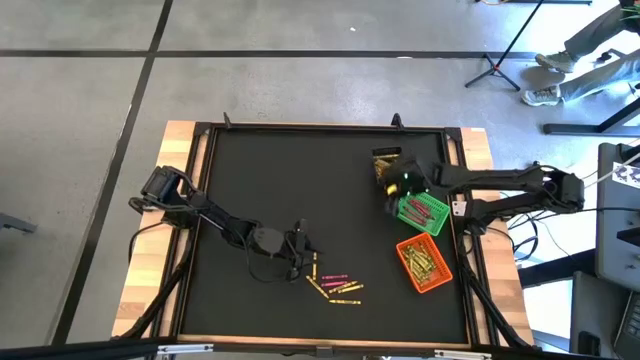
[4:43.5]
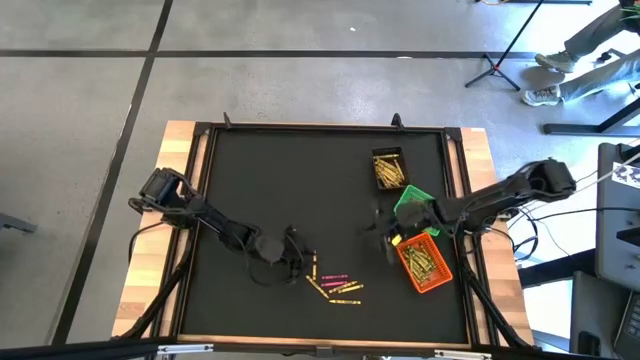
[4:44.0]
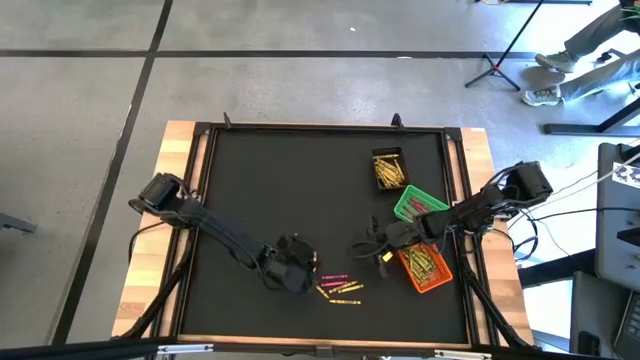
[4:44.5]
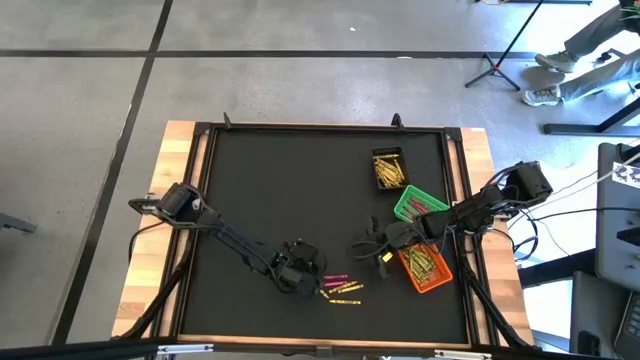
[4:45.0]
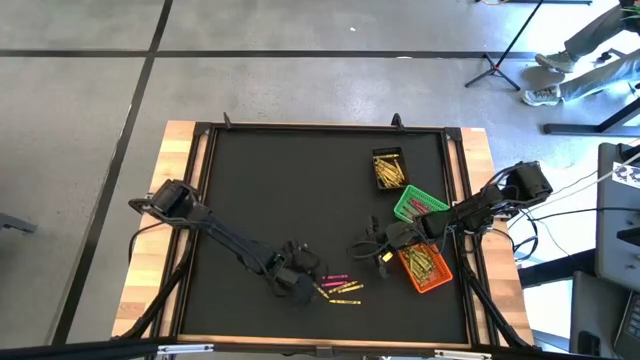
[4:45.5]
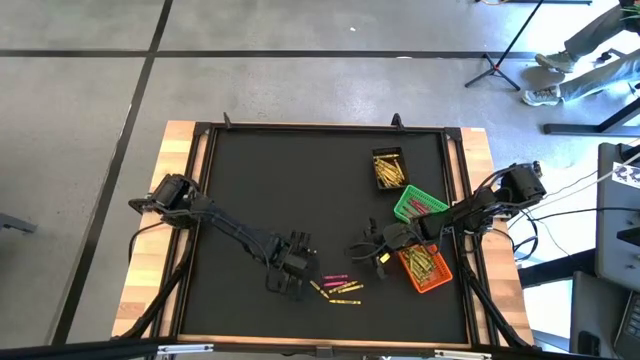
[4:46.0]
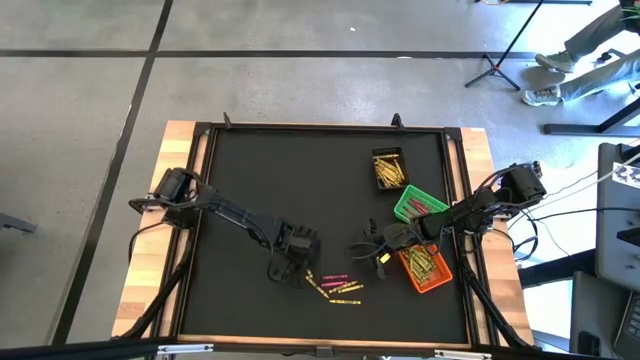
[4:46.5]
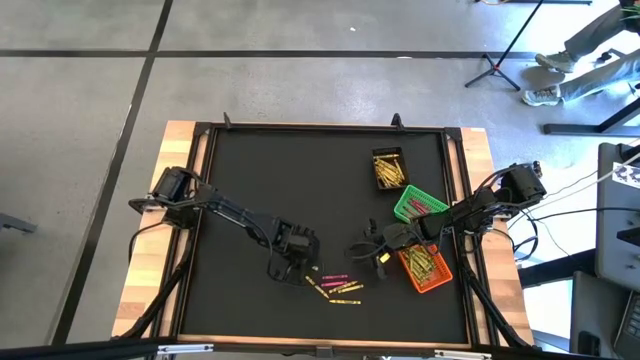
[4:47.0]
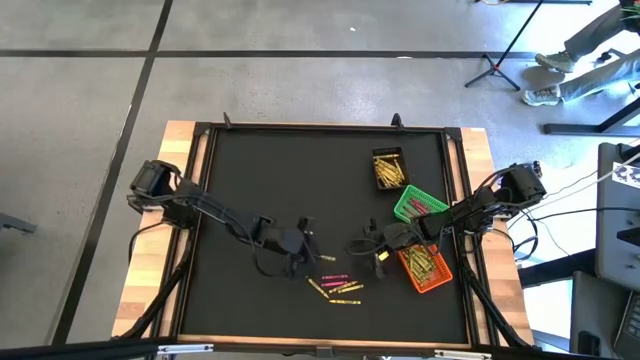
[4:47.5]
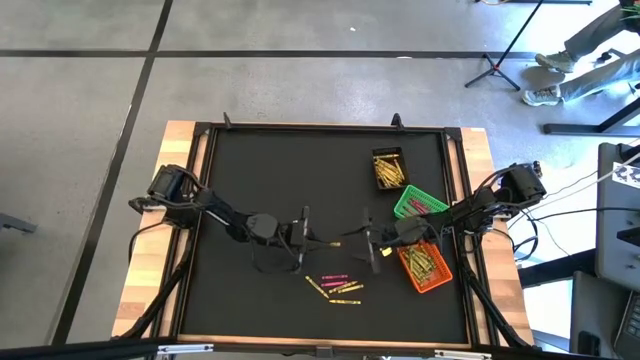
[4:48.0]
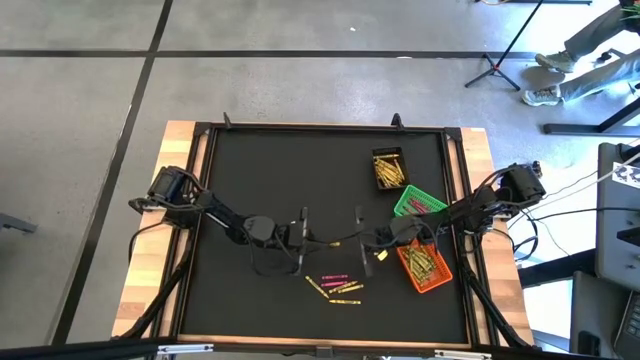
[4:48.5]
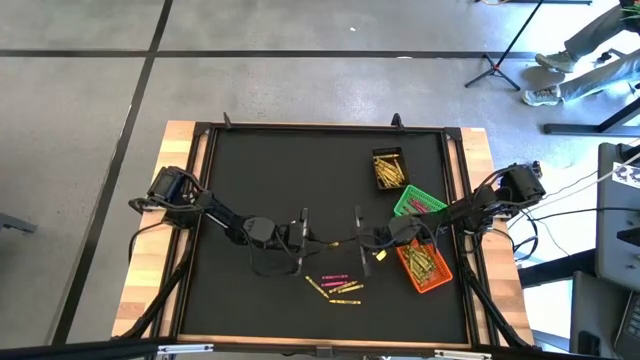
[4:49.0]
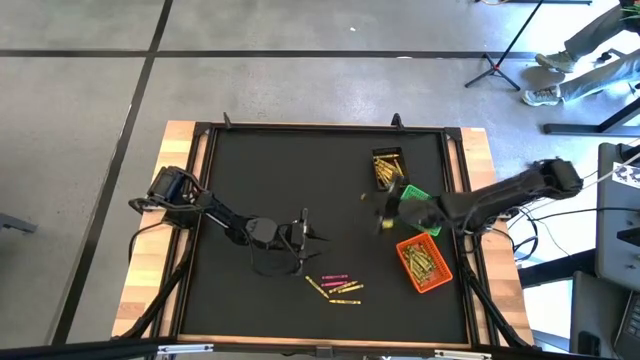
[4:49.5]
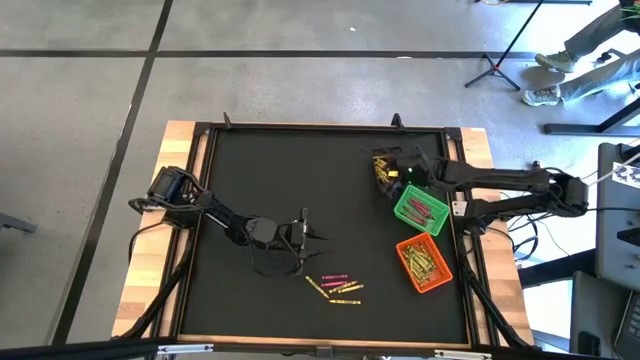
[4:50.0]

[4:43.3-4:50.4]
Task: Sort crayons
Put the yellow crayon into the black basket

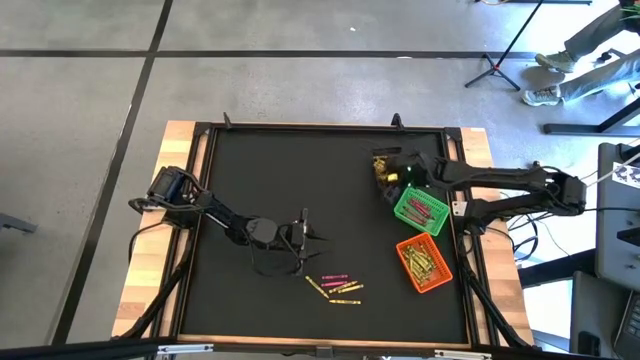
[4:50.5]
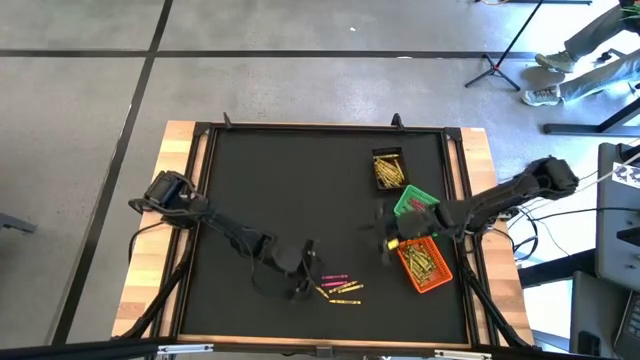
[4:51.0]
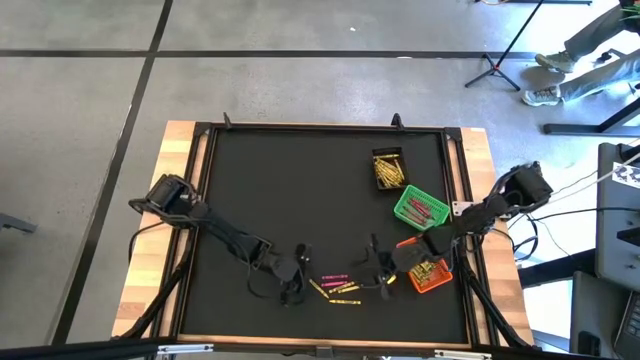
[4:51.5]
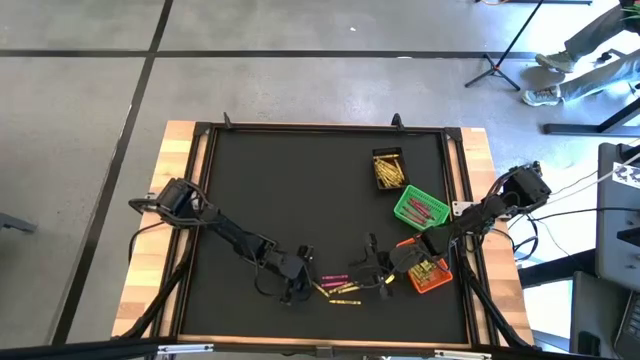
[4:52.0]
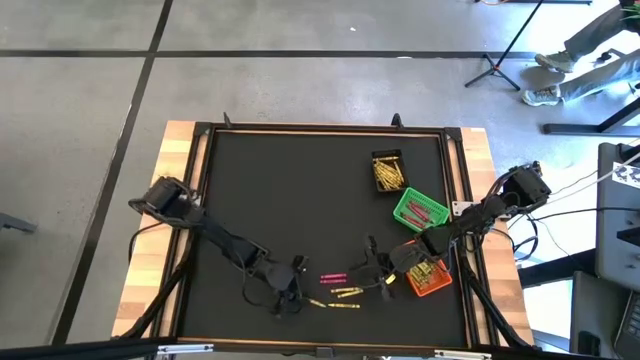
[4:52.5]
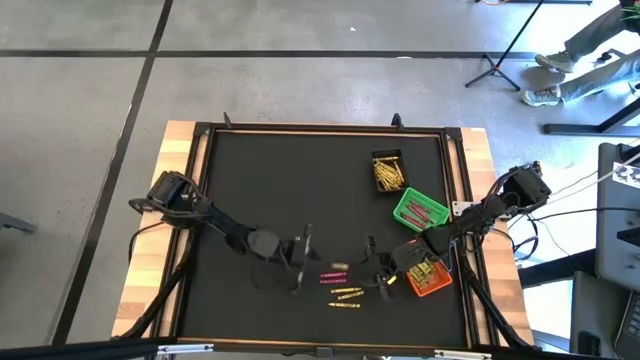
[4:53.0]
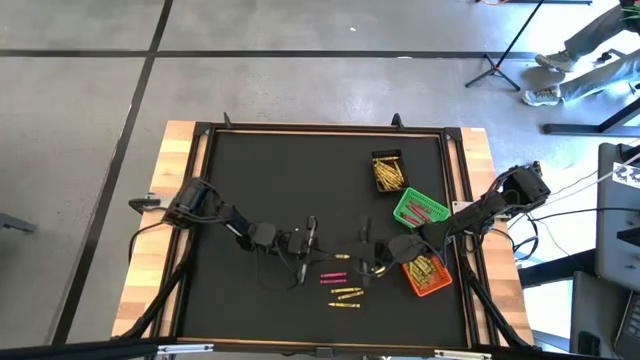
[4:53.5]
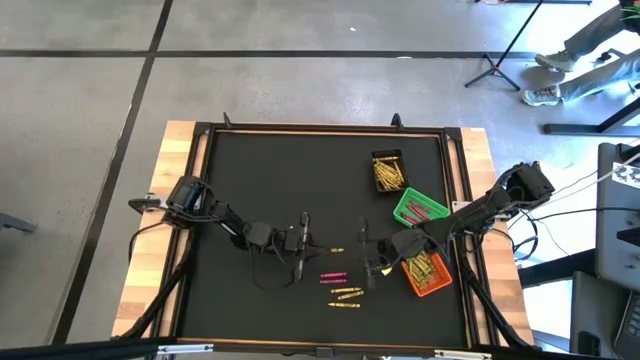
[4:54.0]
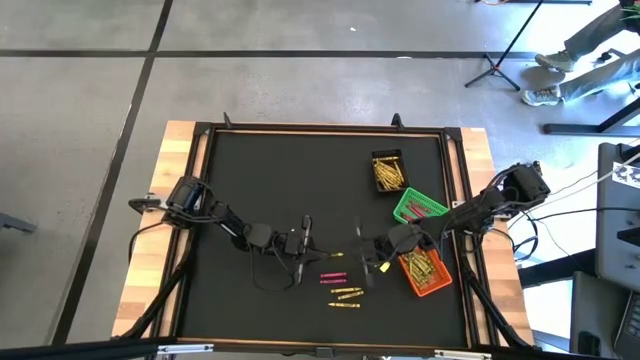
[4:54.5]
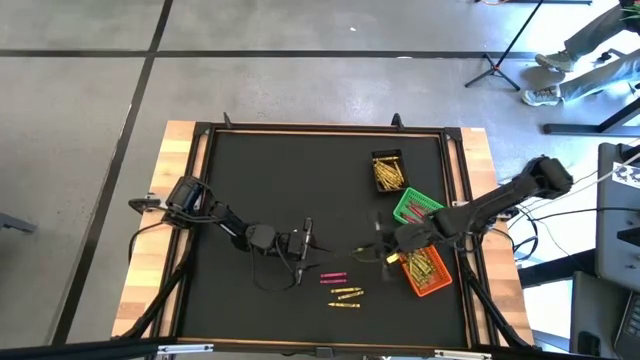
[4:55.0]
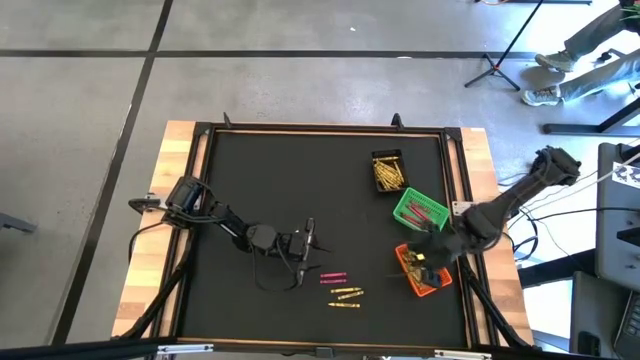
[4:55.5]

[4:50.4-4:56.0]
Put the light green crayon into the orange basket

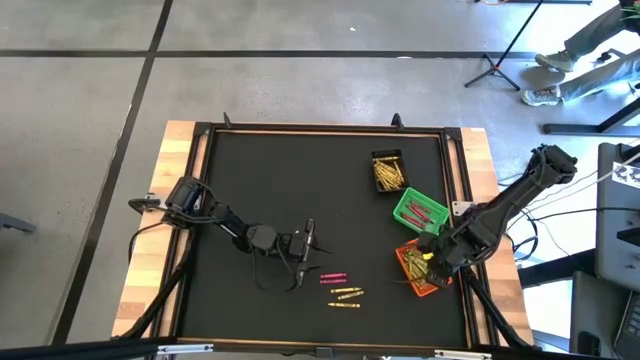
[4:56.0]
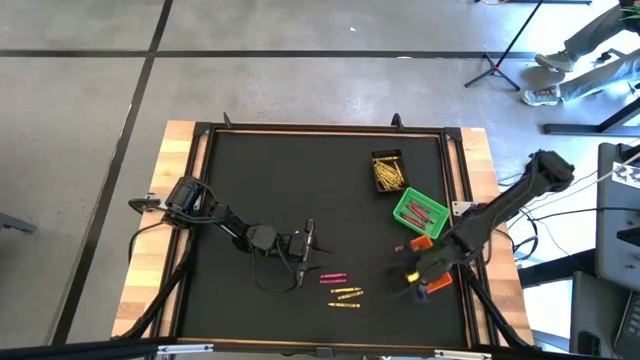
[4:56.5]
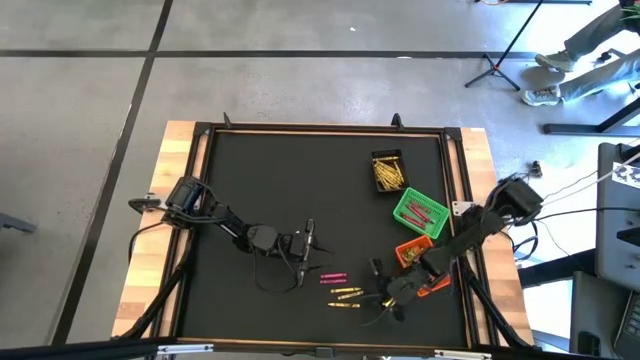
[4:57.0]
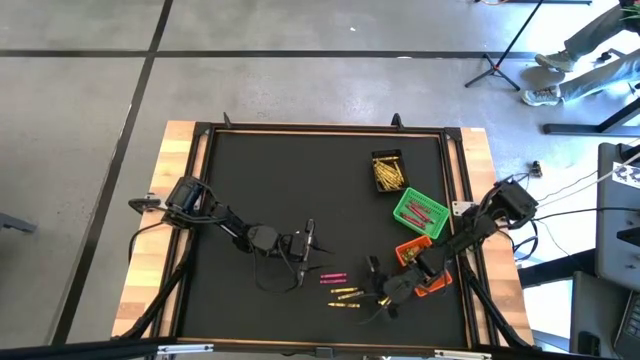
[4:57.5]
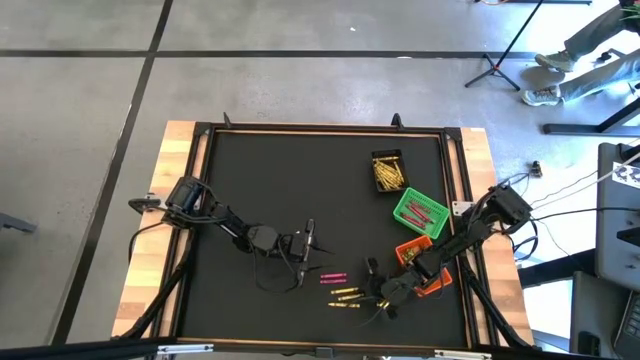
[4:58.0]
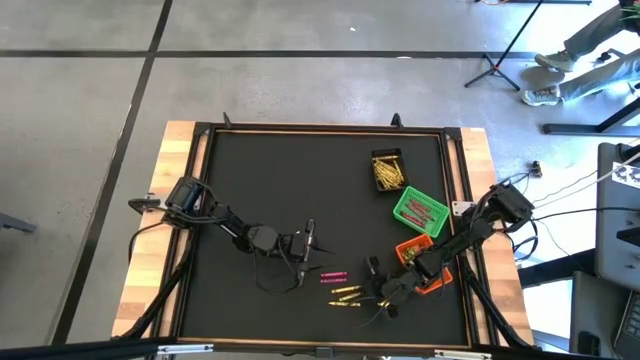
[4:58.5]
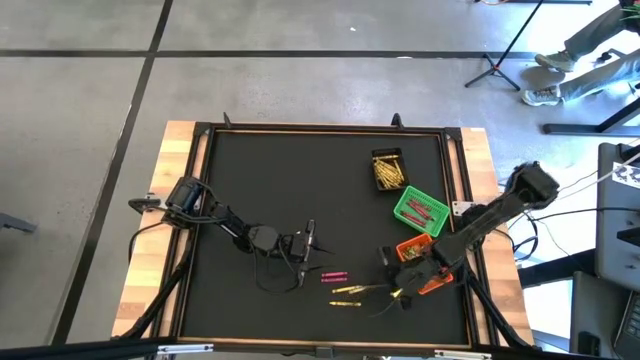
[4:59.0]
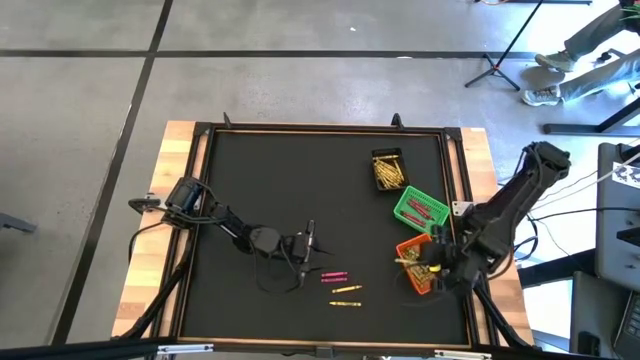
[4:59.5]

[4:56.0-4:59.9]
Put the green crayon into the orange basket

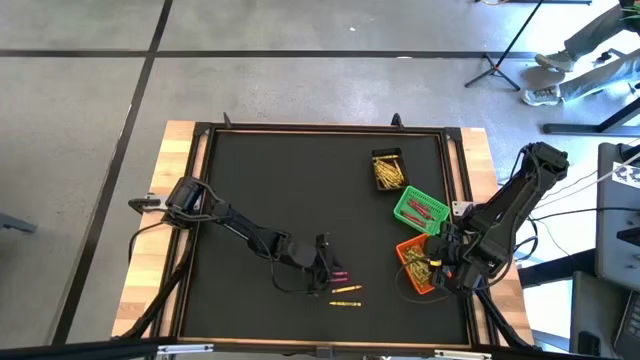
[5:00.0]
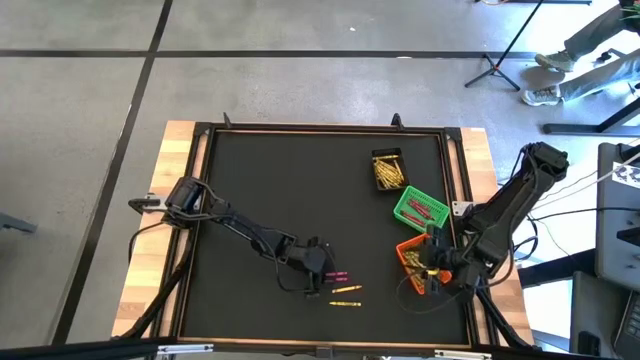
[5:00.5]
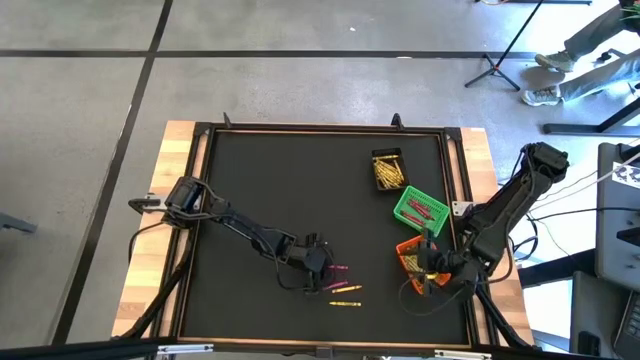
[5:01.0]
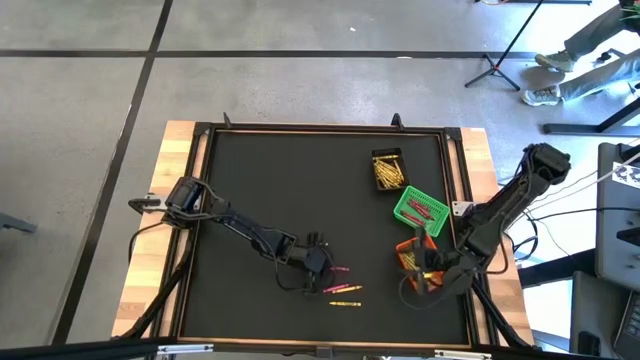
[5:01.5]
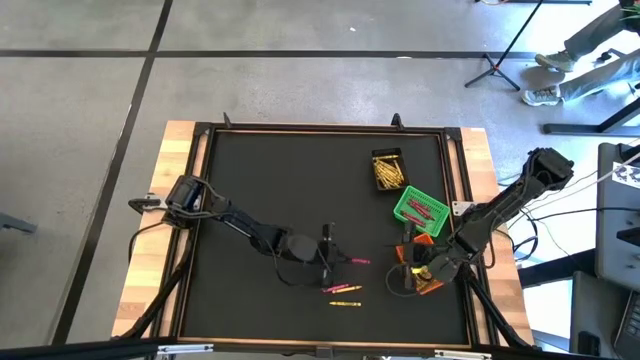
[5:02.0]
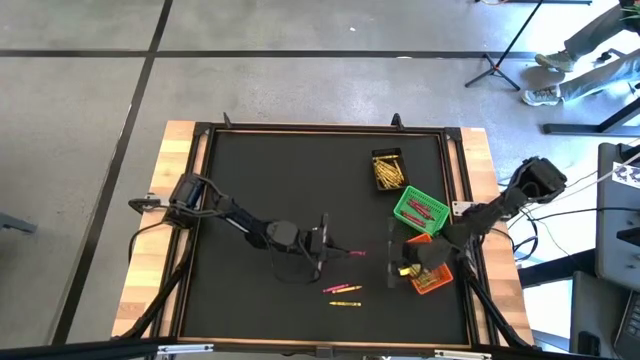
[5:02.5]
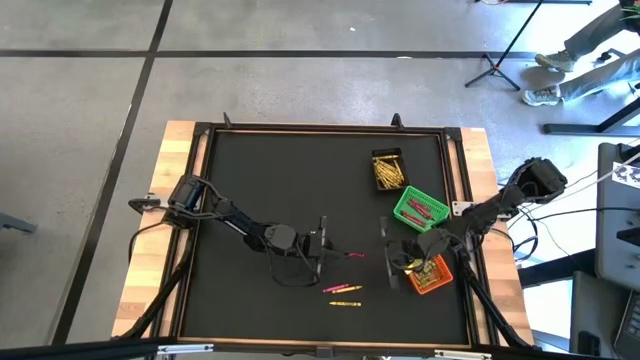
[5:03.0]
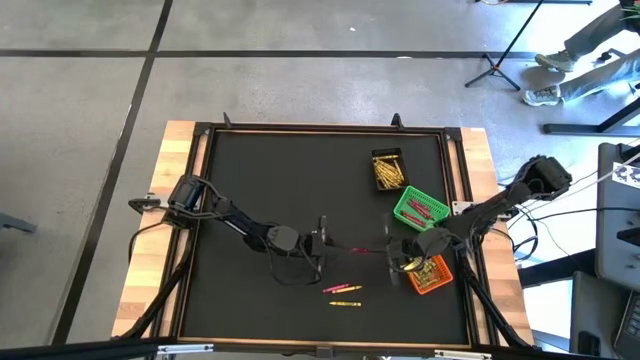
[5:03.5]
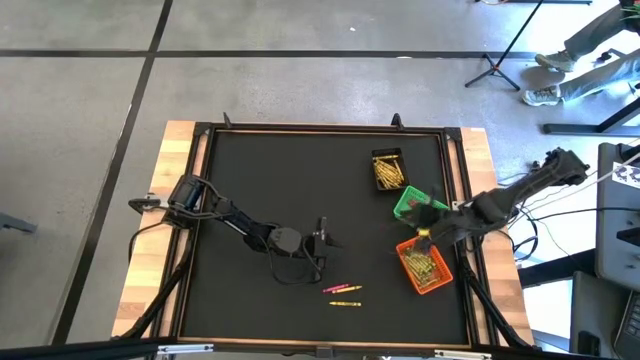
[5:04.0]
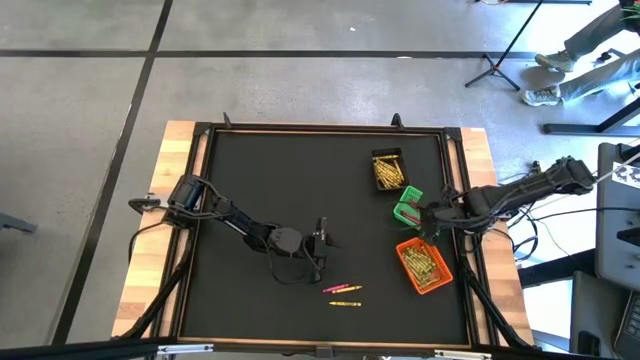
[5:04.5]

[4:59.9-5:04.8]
Put the red crayon into the green basket
